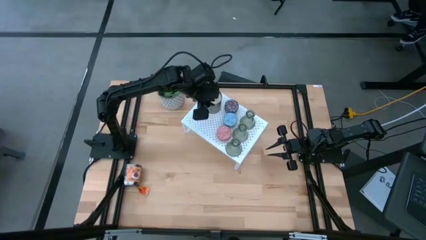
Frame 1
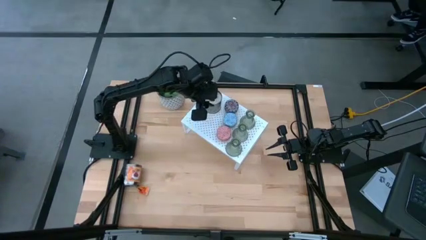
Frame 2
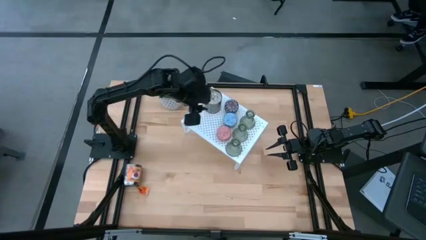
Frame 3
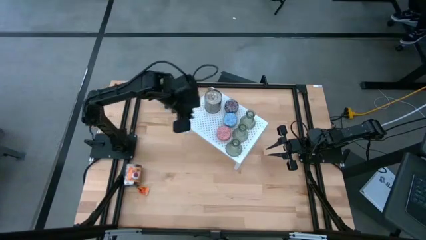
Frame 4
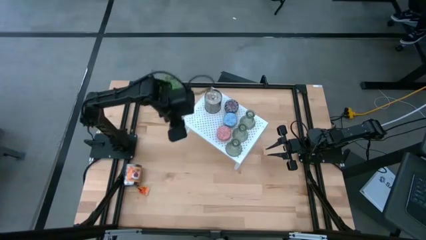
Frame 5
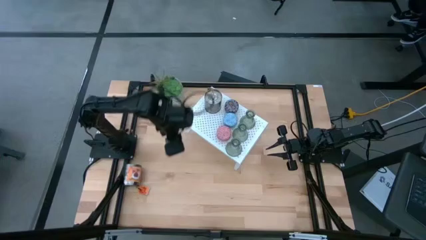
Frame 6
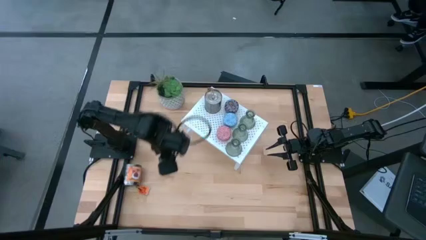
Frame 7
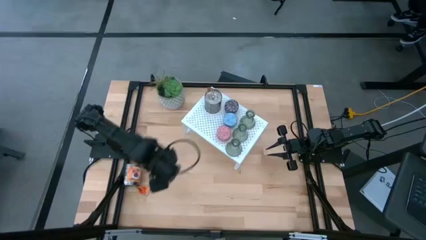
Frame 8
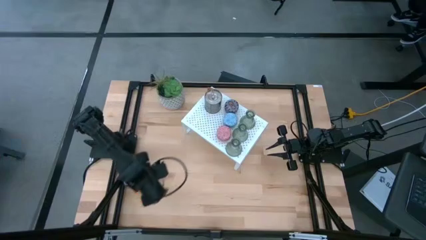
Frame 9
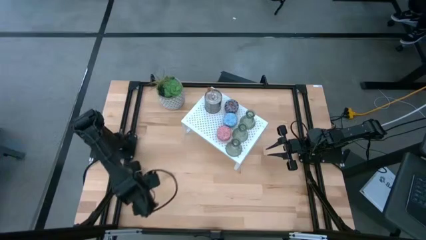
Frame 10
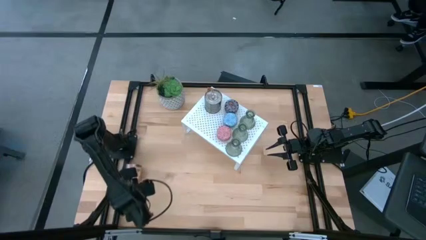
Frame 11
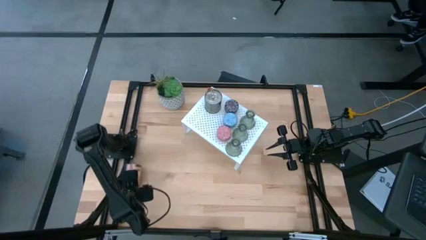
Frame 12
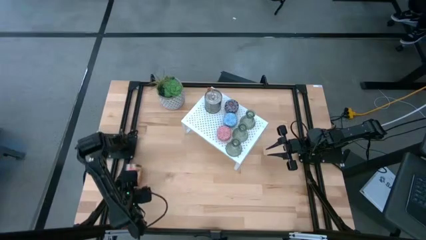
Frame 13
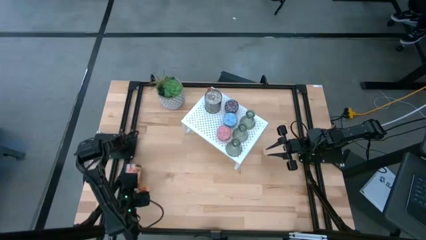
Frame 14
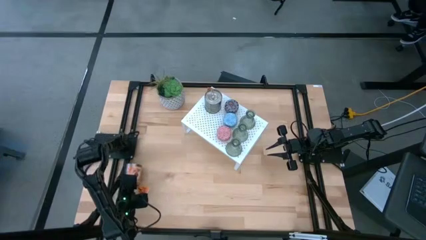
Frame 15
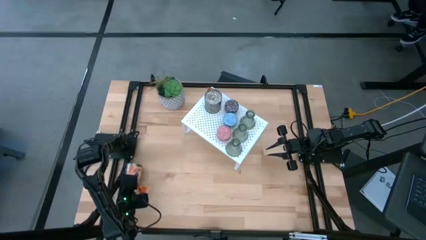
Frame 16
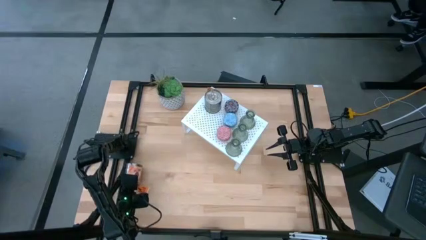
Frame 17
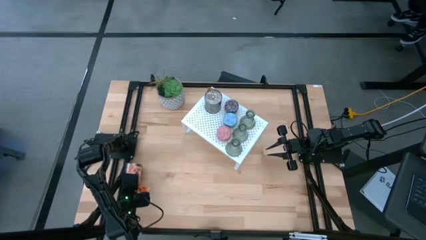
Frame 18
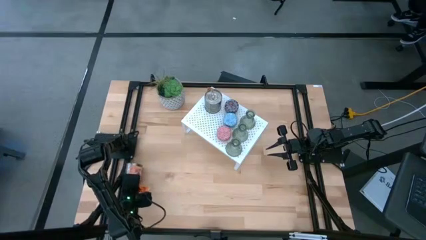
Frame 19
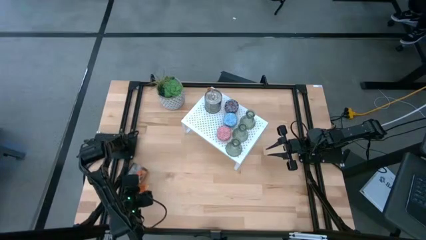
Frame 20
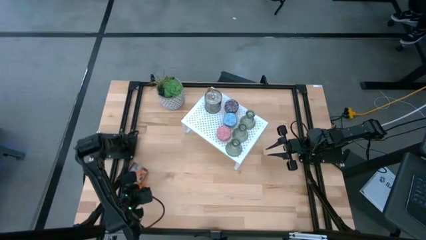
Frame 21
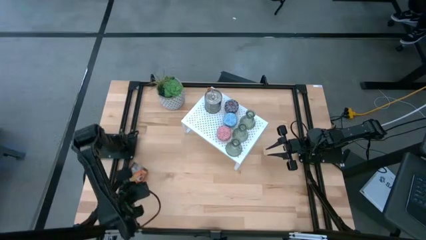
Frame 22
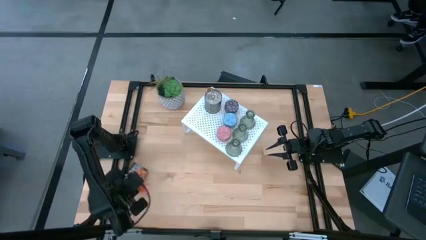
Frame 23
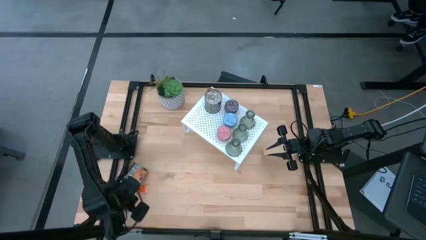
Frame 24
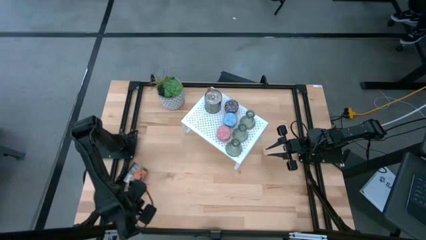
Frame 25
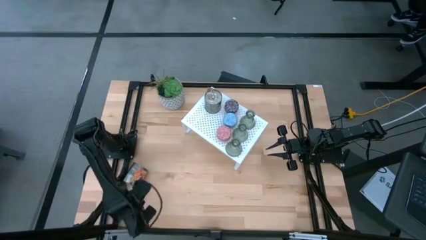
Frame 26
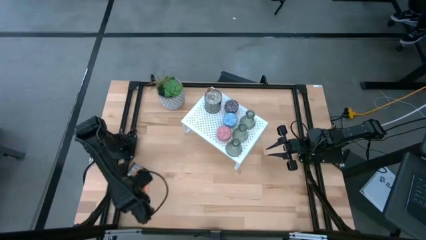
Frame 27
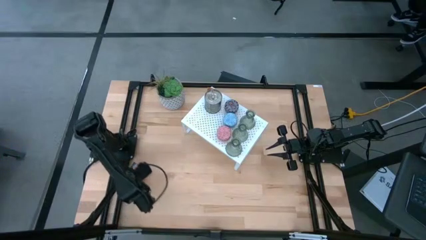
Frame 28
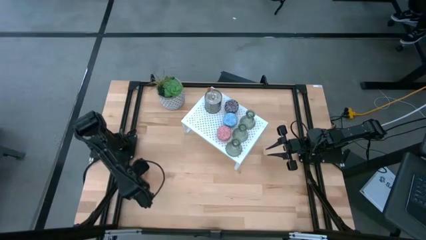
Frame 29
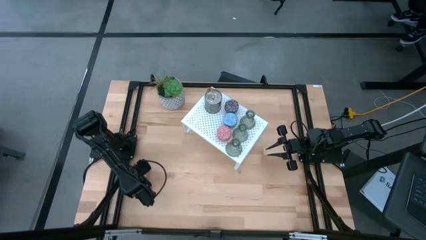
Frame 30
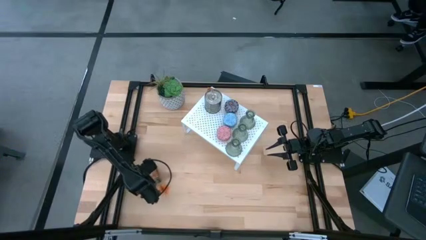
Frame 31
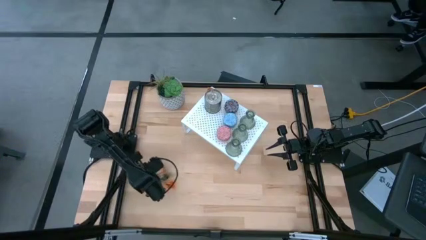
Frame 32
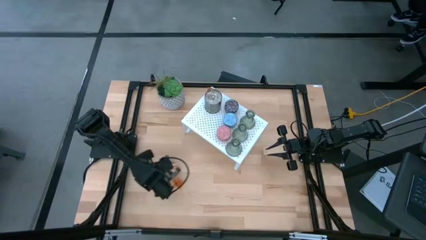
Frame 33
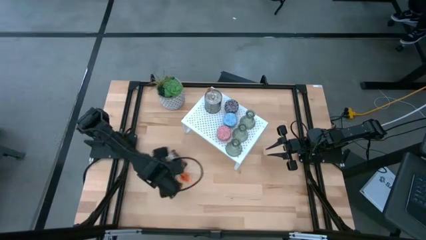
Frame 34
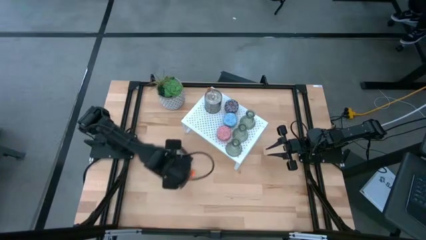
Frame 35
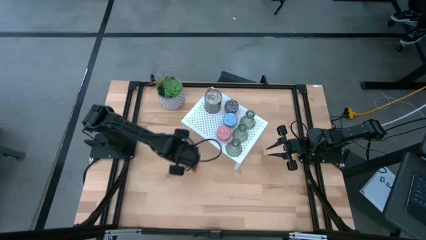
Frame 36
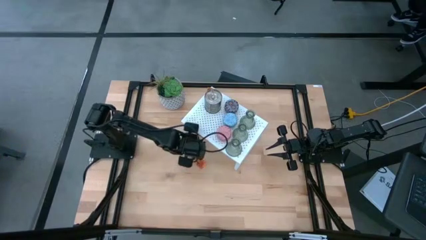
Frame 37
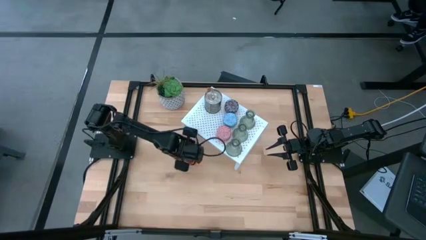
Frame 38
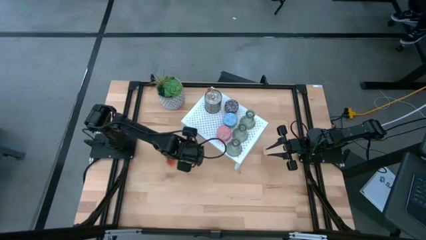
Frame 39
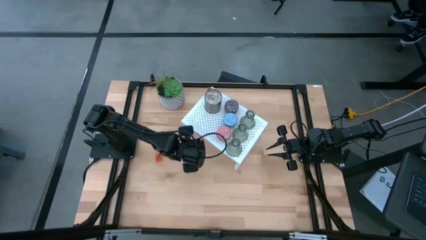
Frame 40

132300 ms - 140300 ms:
Task: Pick & Place candle stick holders
Put the silver scented candle on the shelf aligned with the other silver scented candle on the shelf

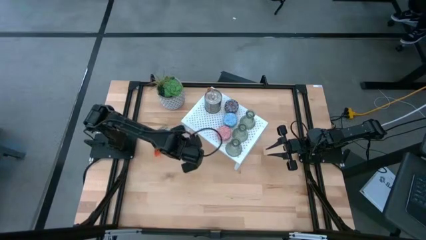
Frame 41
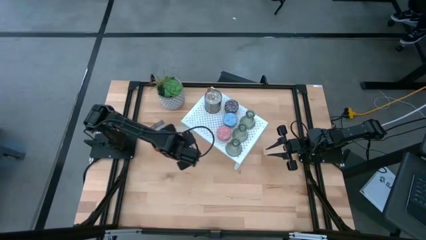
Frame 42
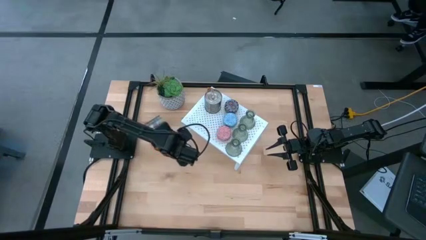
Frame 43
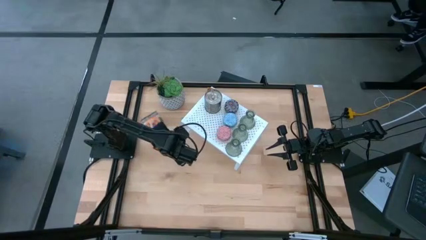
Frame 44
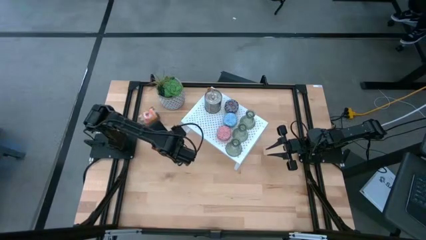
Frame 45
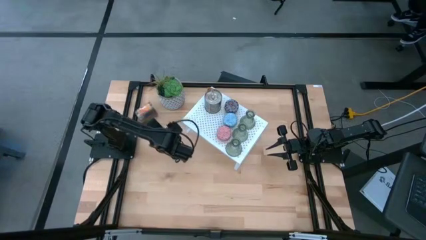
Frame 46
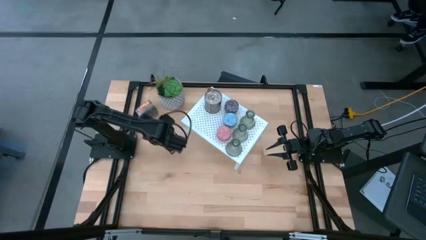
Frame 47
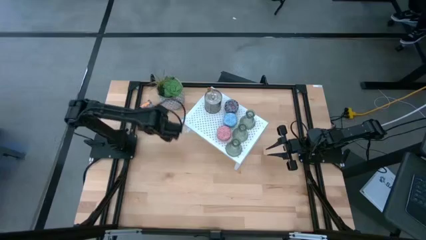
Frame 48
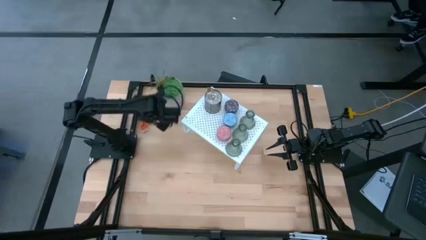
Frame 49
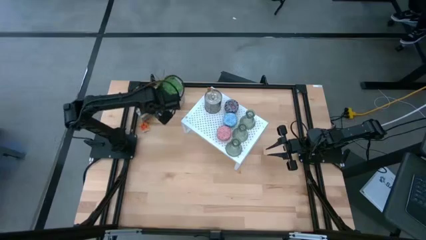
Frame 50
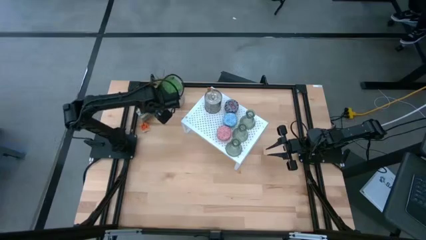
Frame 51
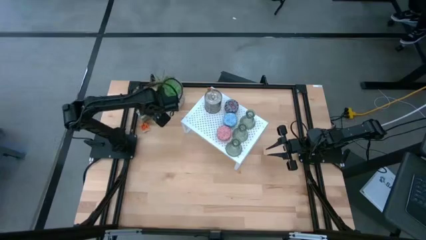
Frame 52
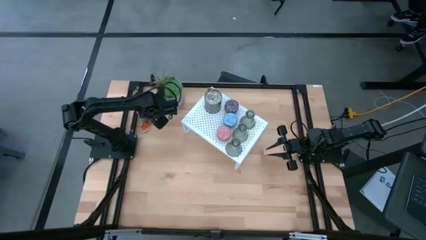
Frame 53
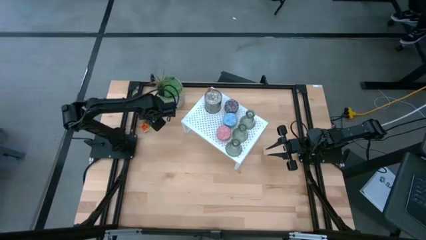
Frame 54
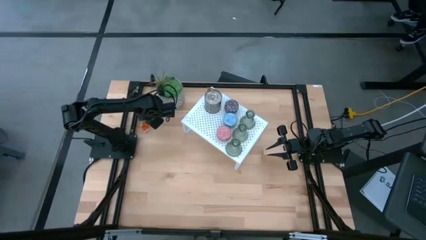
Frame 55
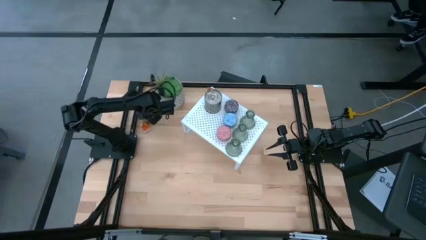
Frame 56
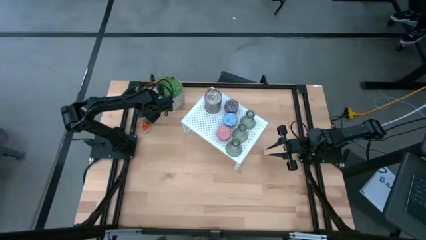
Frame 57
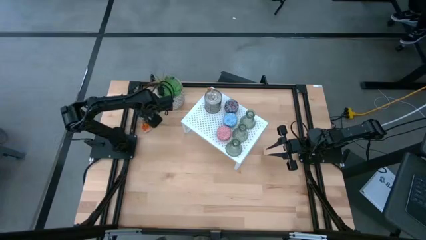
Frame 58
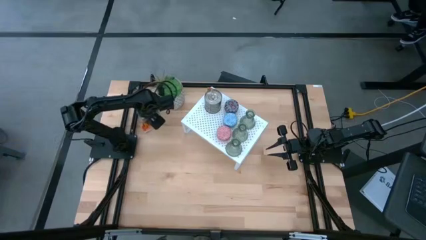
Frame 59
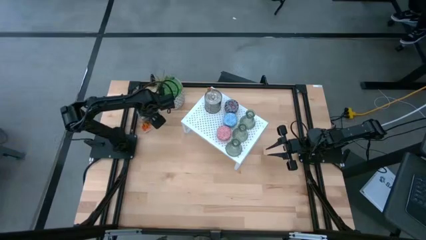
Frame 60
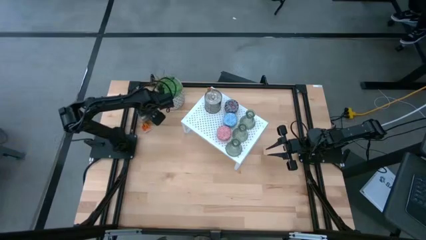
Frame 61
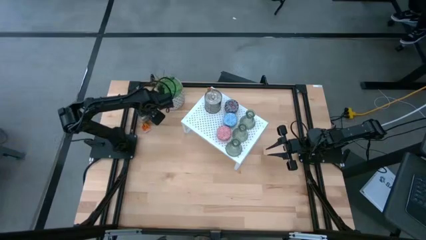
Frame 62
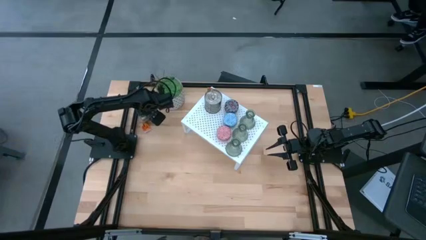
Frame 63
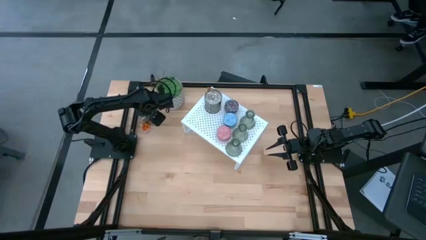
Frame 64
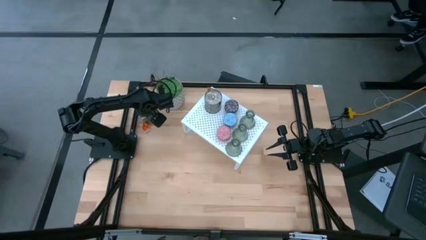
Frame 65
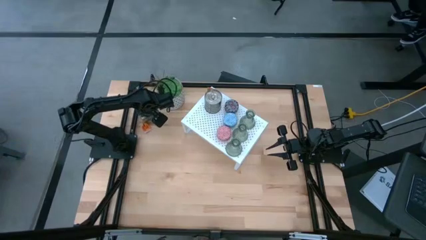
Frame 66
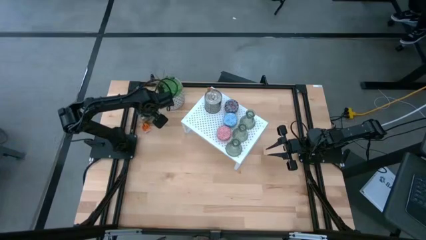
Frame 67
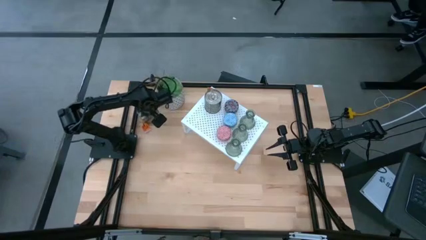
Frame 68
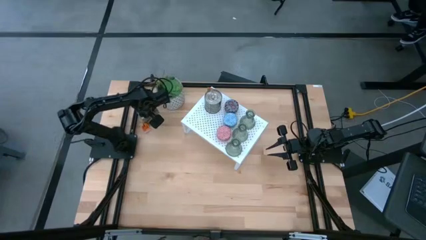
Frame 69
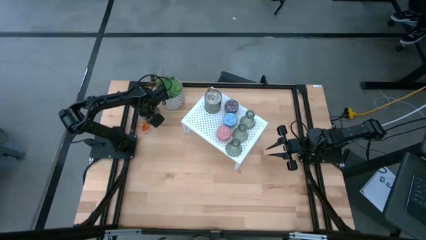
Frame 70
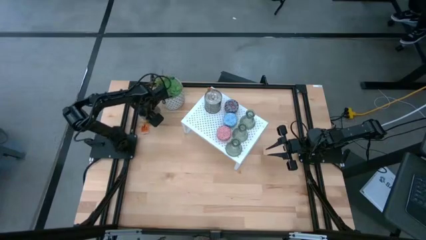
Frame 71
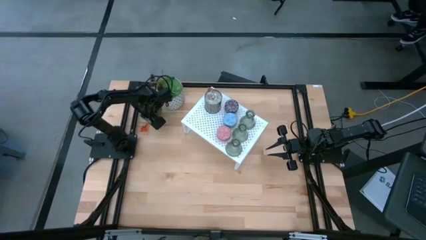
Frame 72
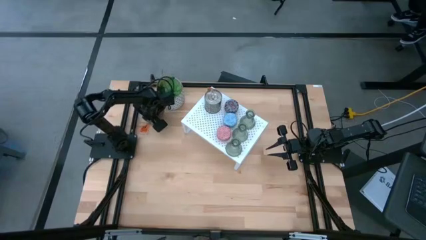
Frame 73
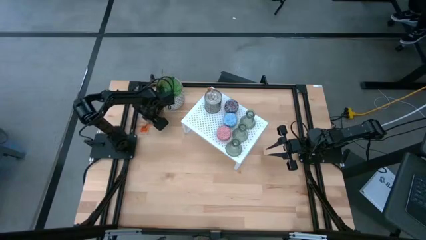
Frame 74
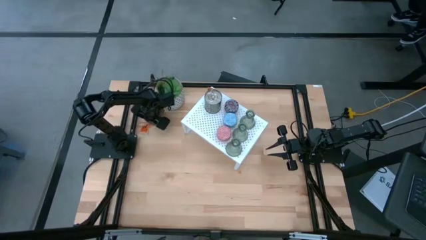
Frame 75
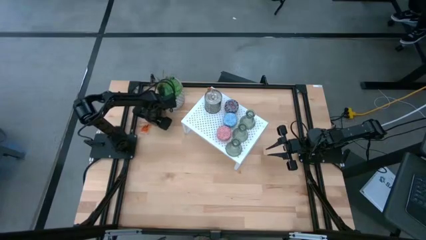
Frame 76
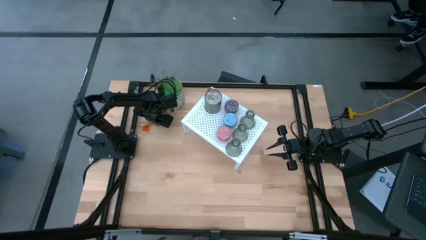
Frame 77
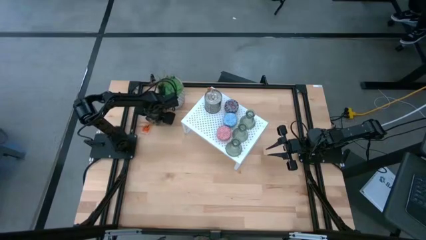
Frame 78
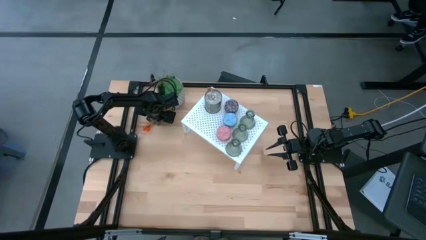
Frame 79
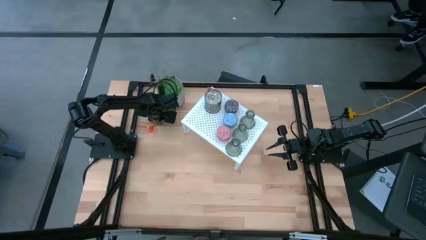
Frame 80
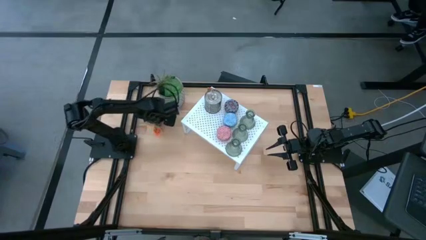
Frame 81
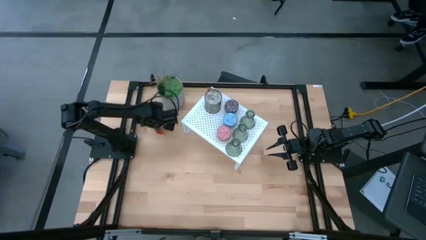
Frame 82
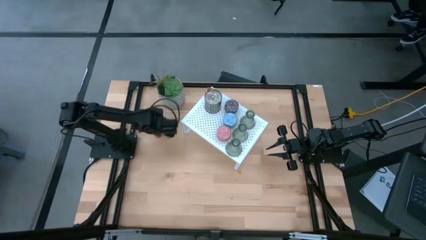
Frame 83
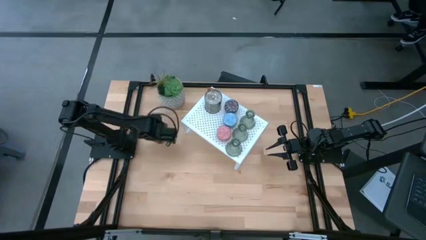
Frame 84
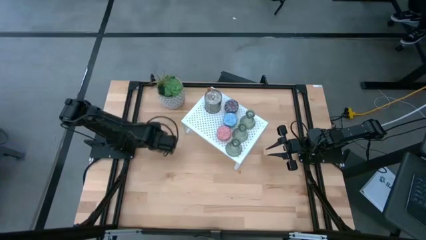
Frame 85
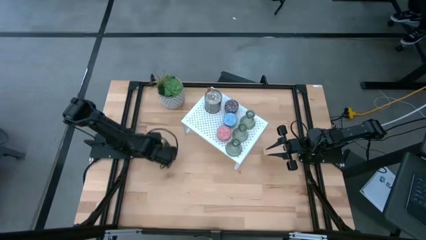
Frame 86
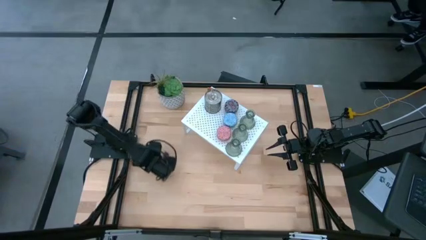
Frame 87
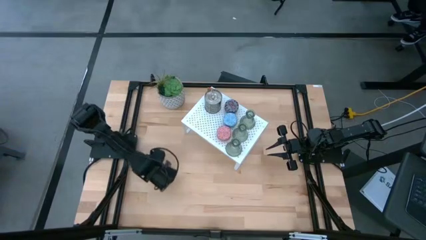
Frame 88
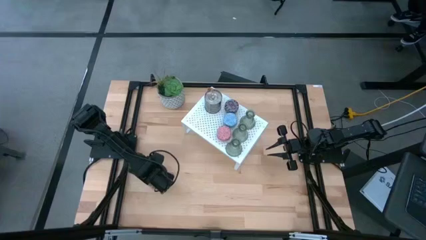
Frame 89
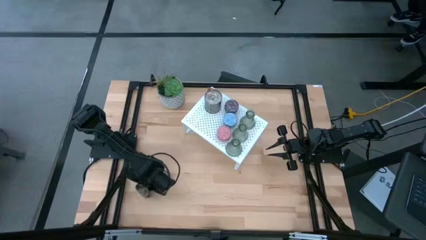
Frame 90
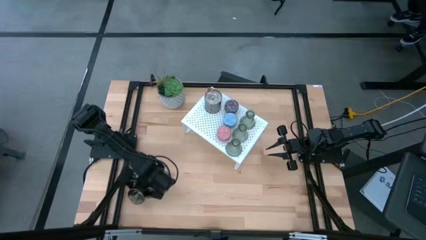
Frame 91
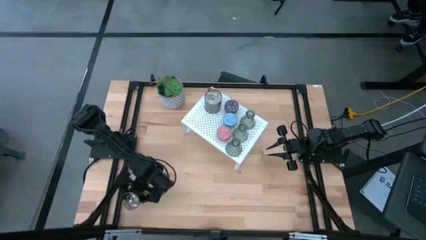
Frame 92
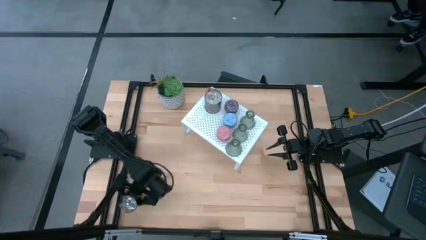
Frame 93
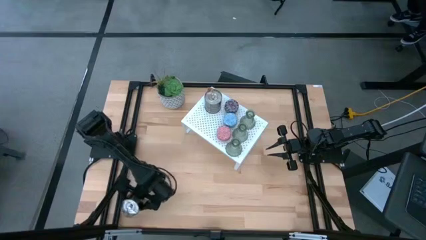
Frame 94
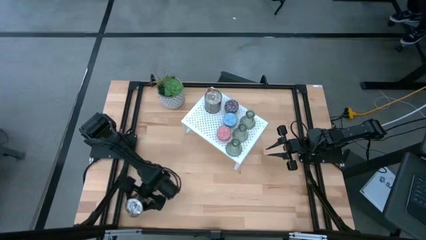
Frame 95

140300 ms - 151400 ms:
Put the silver scented candle on the shelf aligned with the other silver scented candle on the shelf
